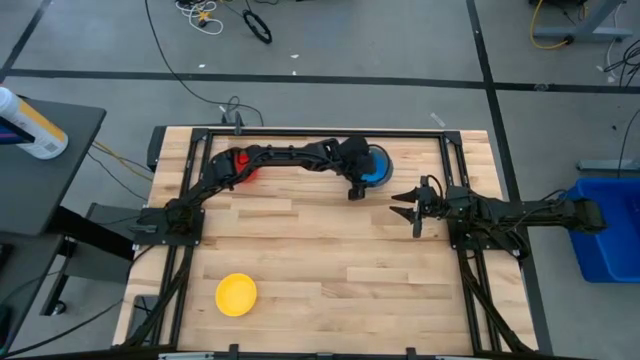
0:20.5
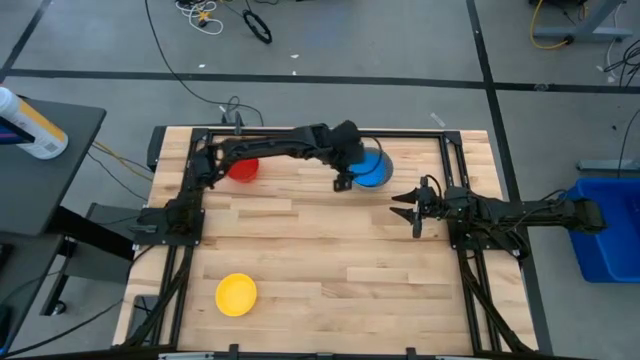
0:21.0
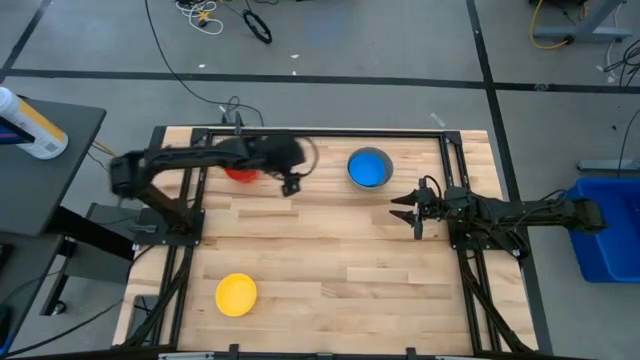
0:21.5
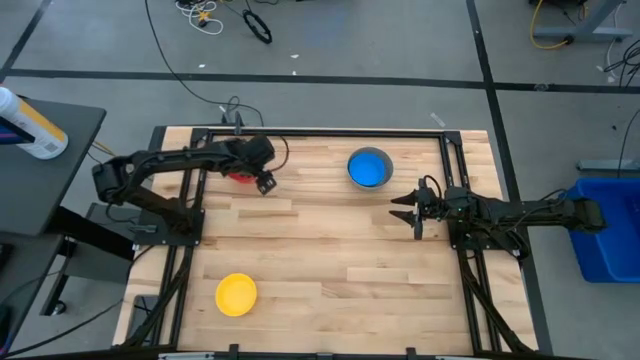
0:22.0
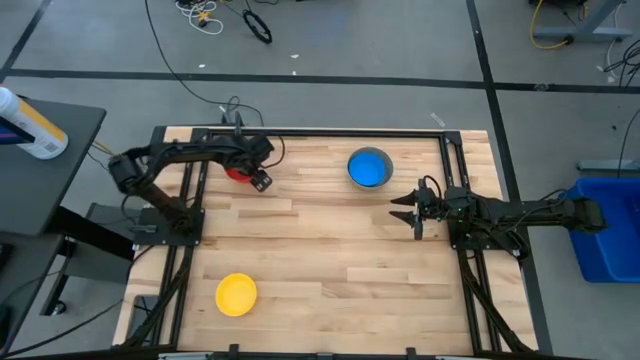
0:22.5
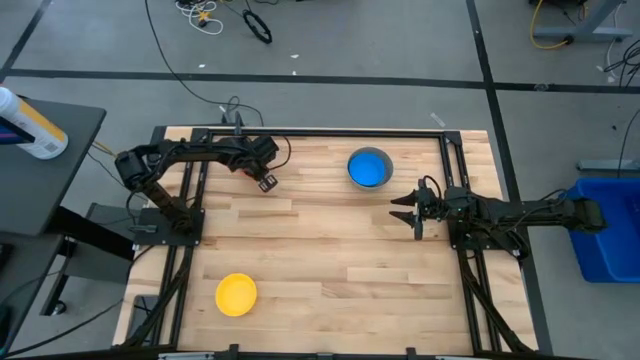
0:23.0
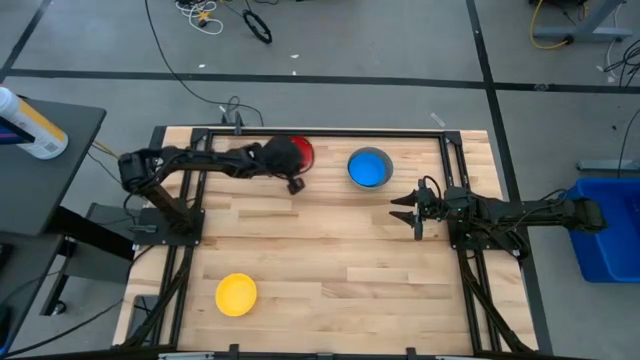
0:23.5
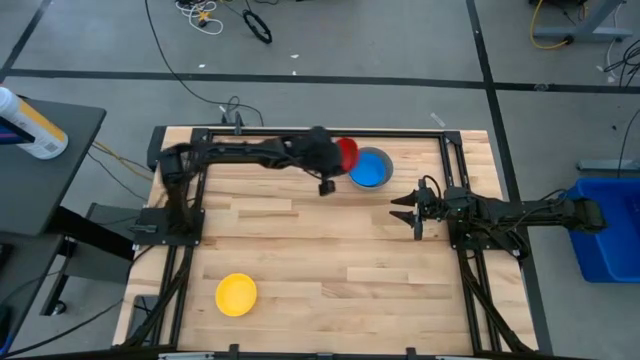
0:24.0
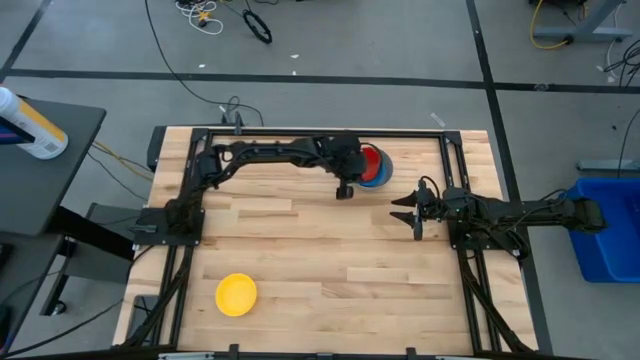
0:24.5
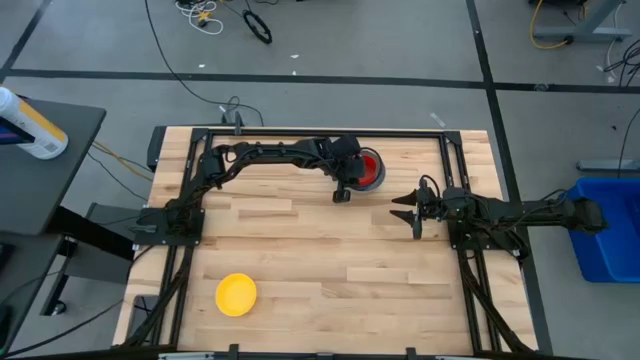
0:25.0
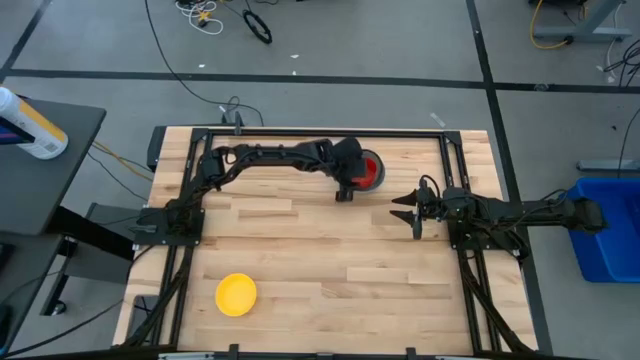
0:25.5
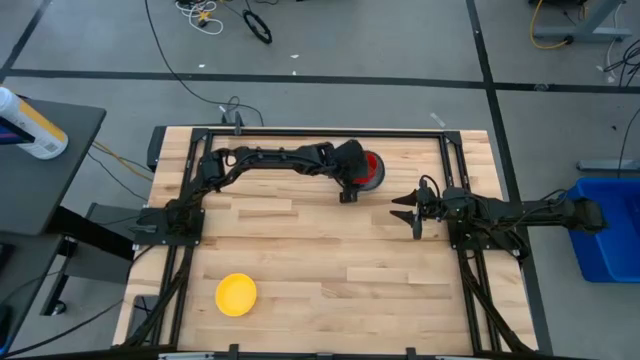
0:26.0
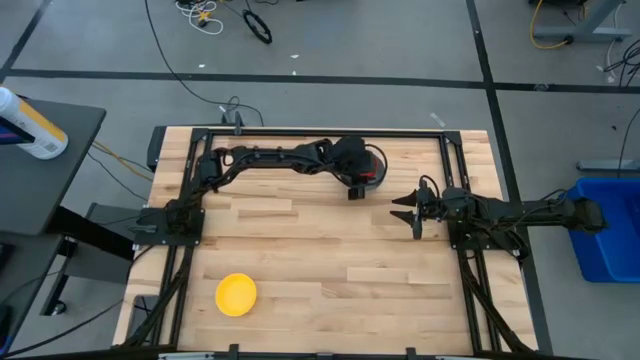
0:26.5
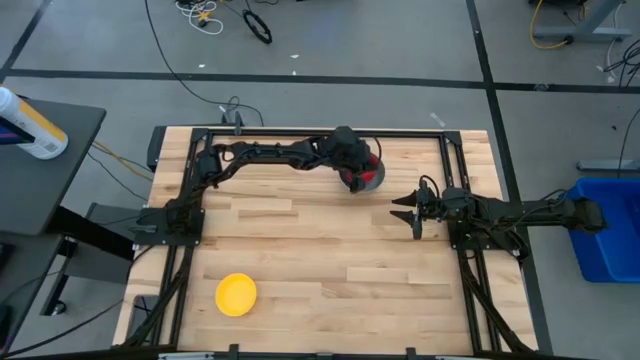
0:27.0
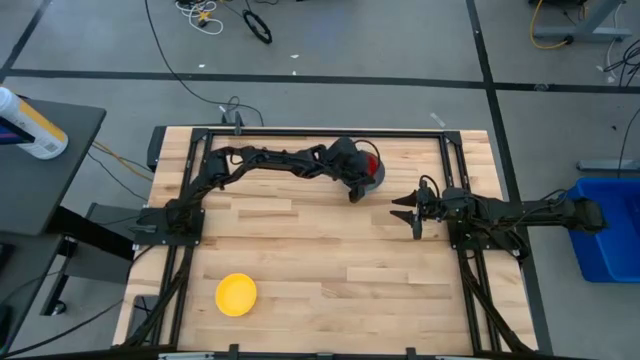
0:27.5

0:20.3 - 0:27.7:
Stack the red bowl on the light blue bowl

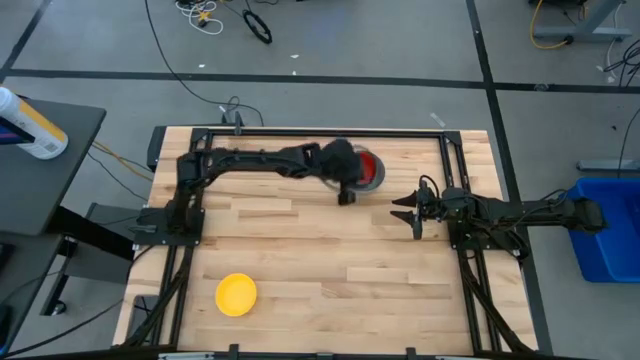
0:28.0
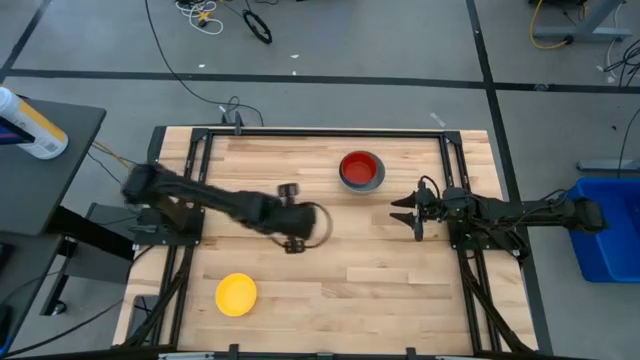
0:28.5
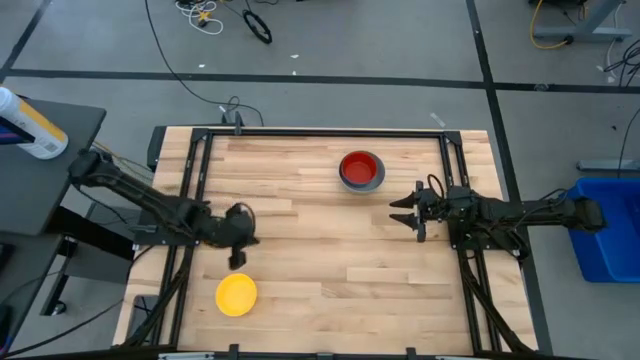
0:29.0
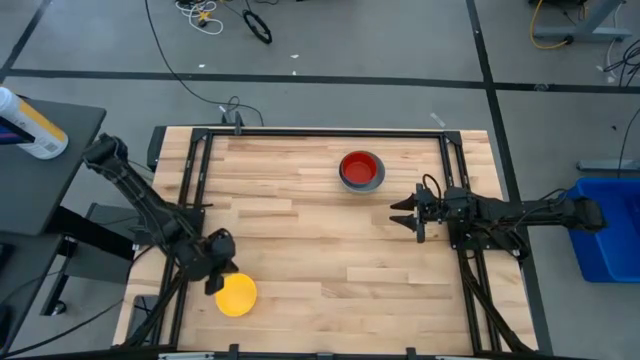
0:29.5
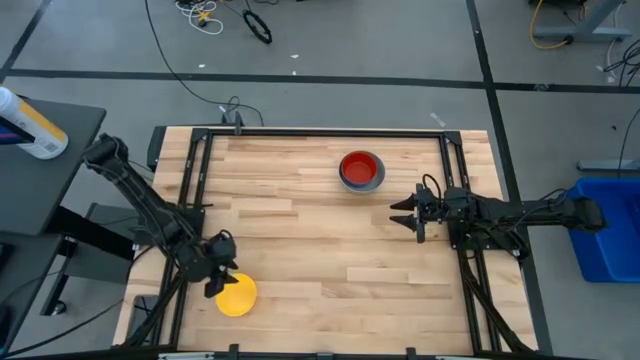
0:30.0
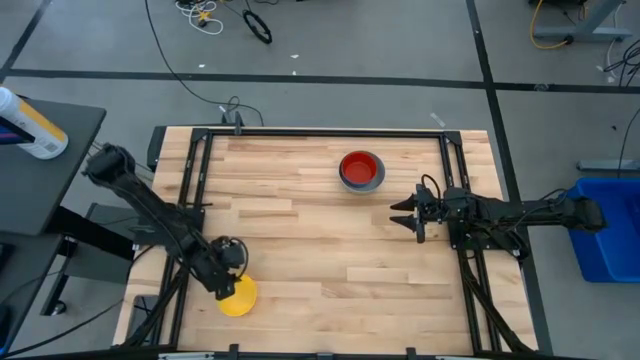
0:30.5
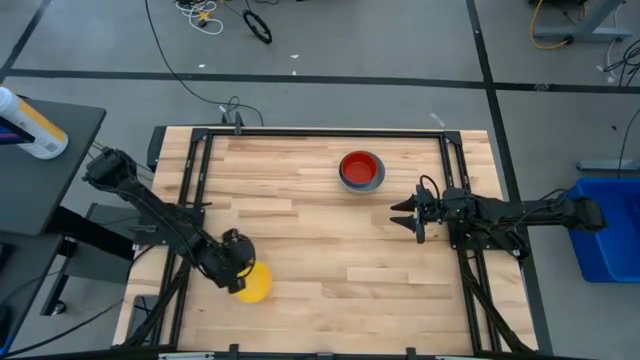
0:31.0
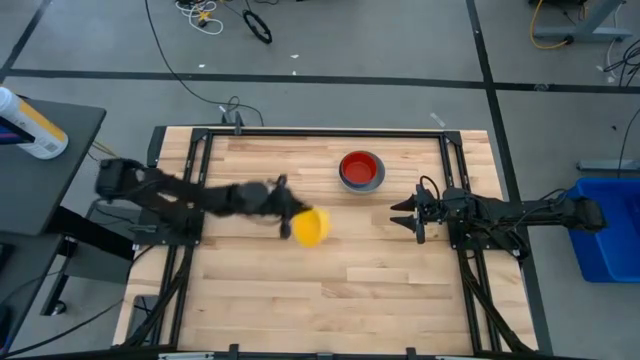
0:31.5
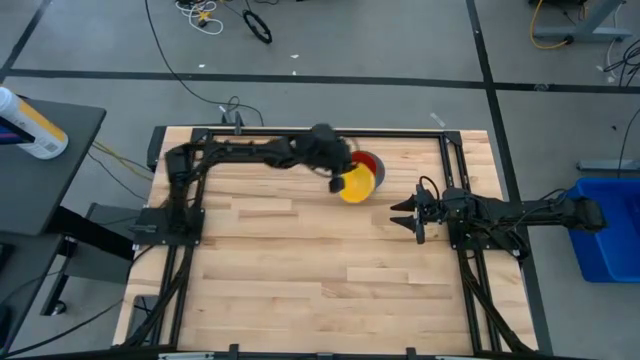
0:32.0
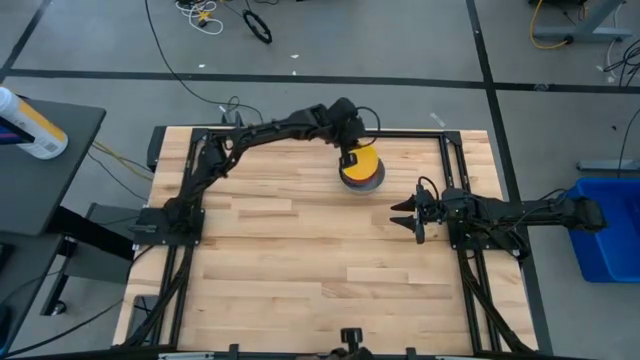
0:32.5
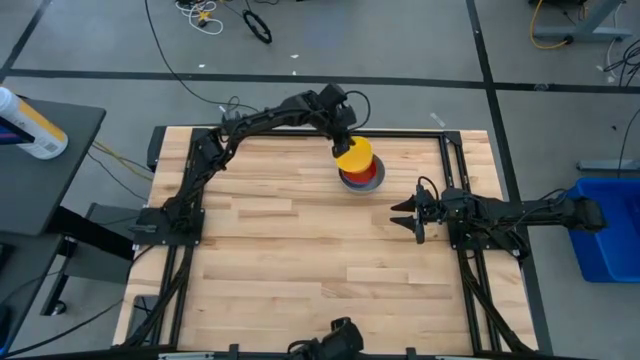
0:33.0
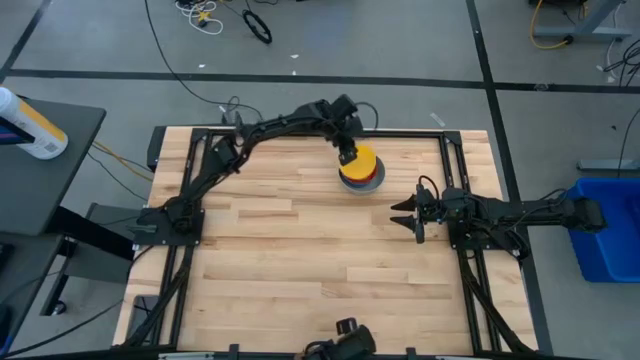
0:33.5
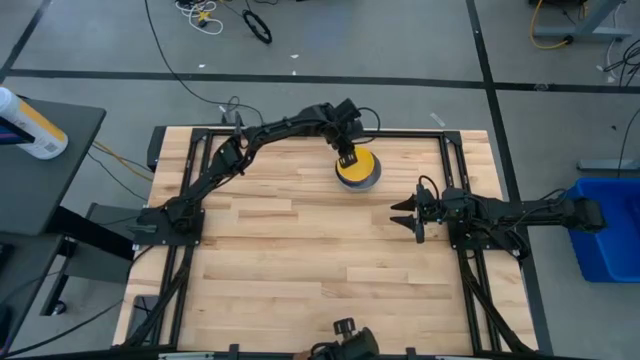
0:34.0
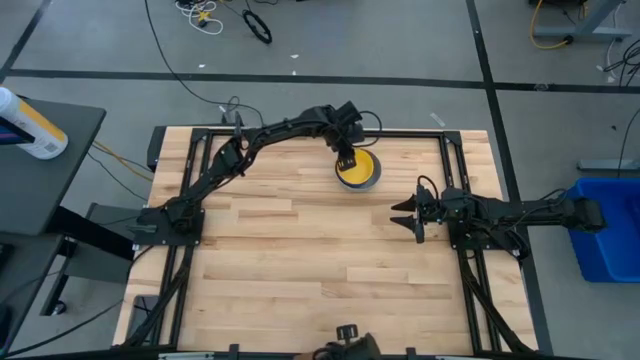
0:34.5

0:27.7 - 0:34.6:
Stack the yellow bowl on the red bowl

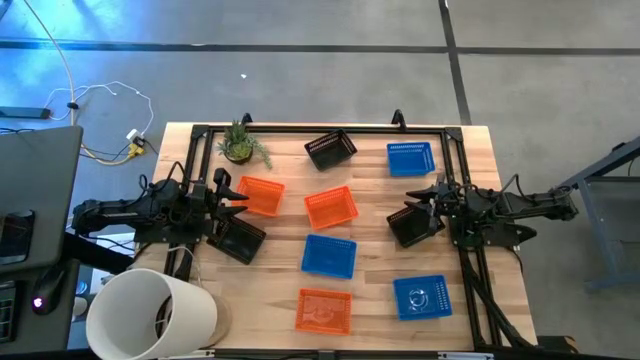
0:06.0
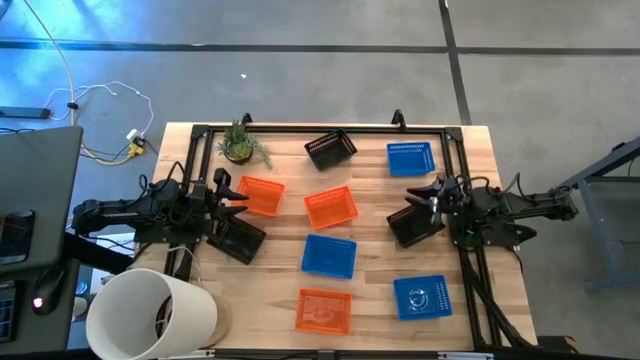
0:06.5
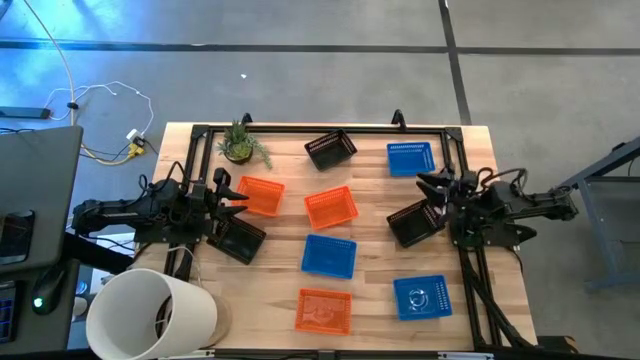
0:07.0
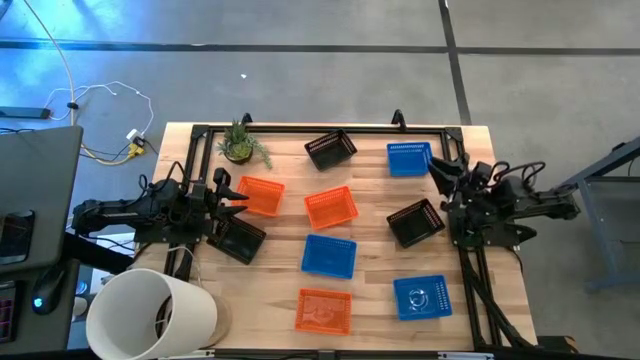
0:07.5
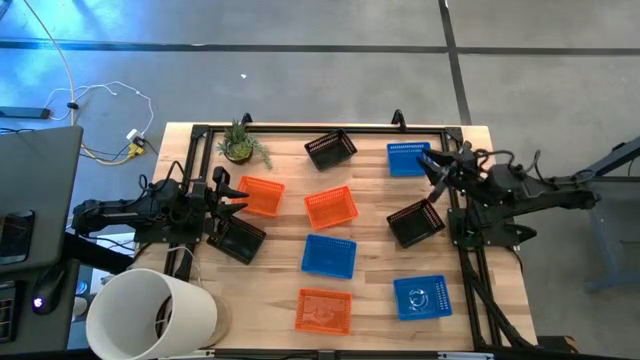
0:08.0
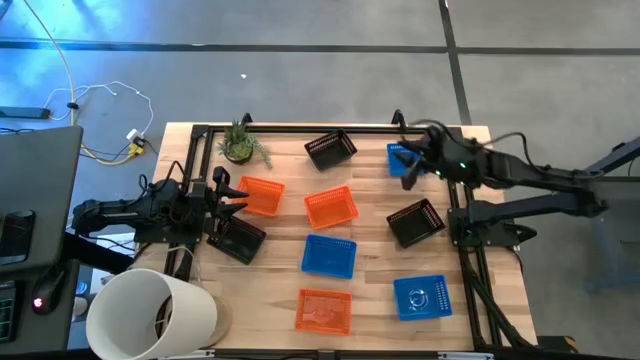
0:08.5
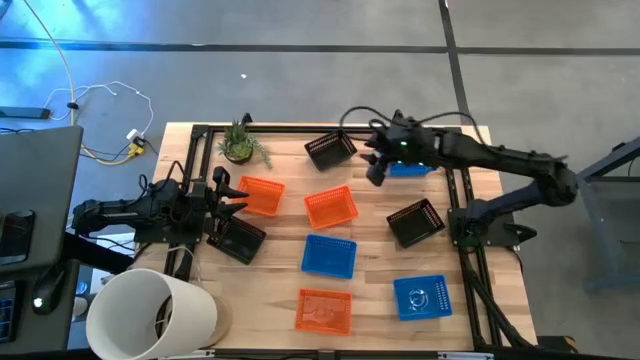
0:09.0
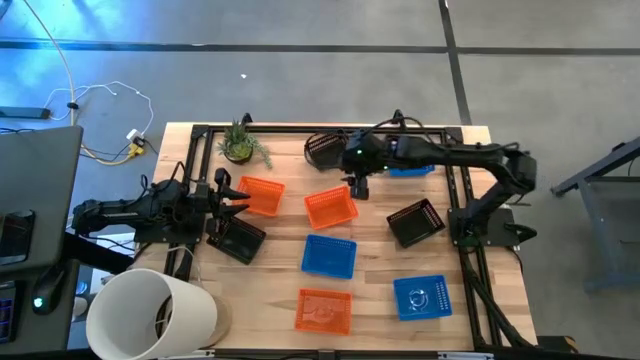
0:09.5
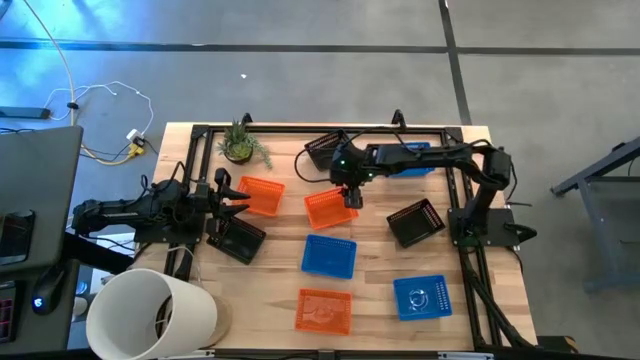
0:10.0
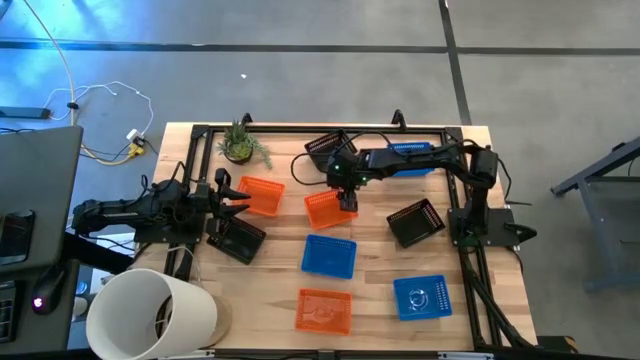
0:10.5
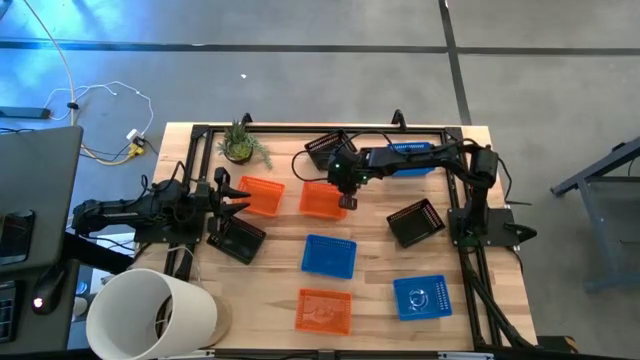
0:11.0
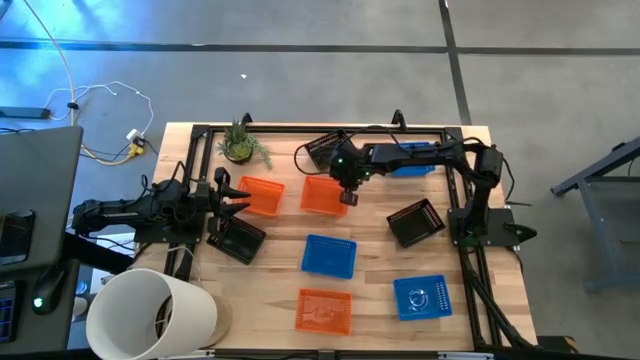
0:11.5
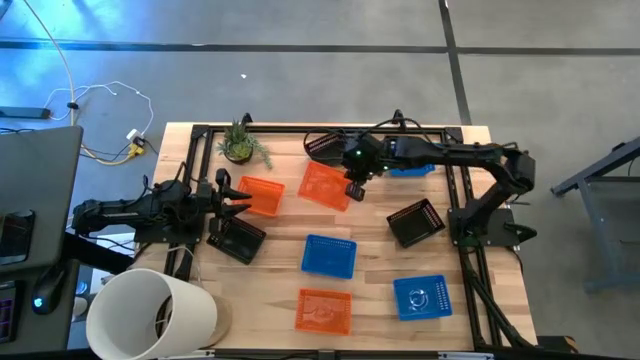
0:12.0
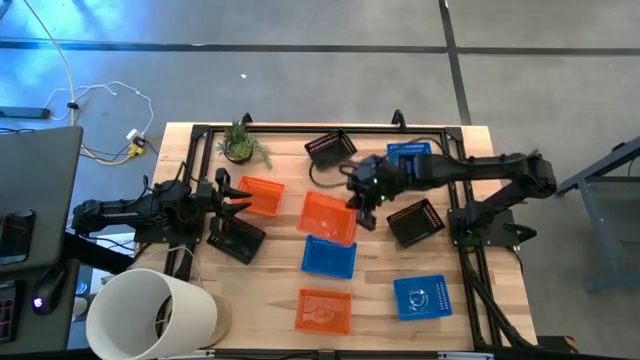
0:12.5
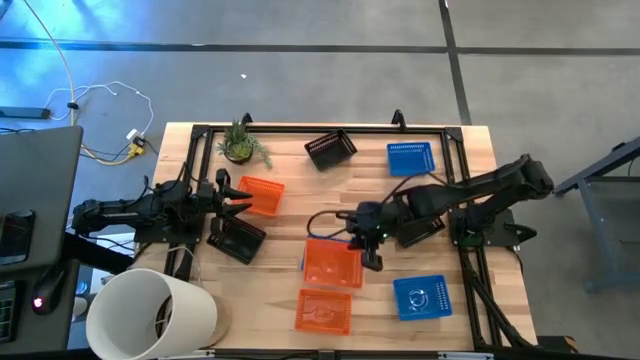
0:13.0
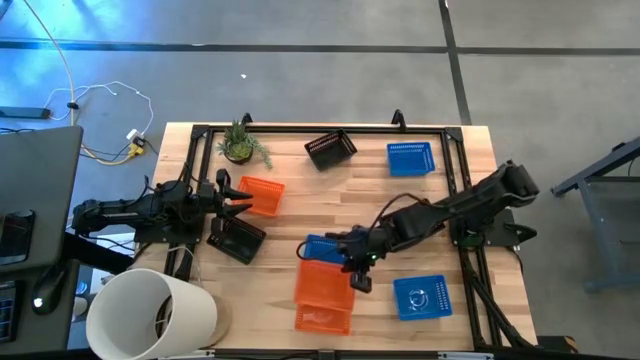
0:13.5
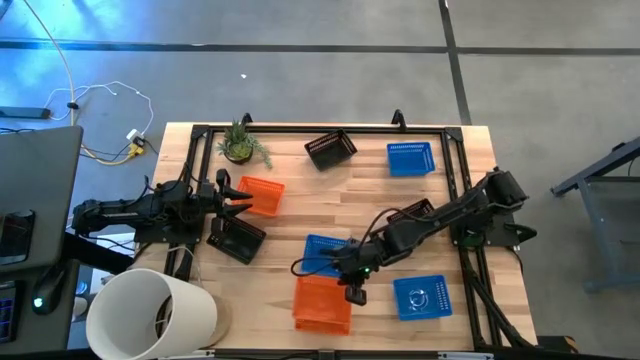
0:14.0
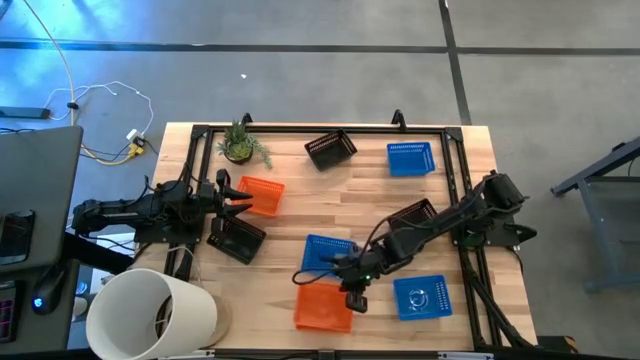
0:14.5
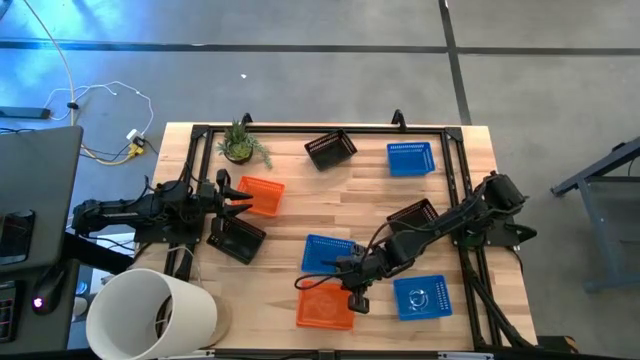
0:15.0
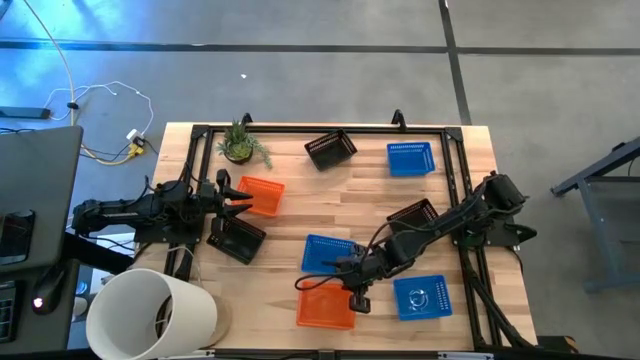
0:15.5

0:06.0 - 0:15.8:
Stack the top right orange basket on top of the bottom right orange basket
